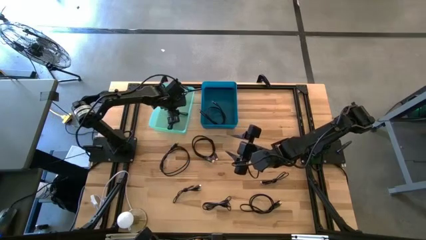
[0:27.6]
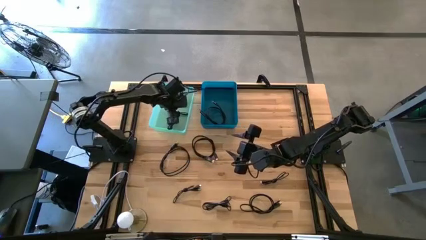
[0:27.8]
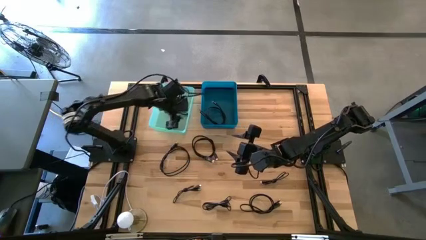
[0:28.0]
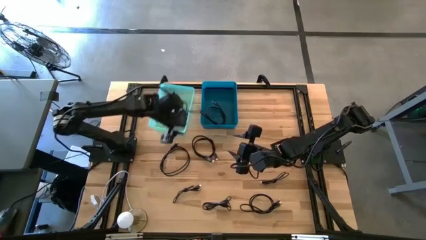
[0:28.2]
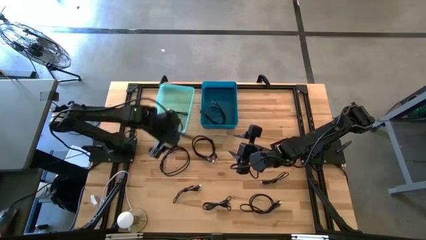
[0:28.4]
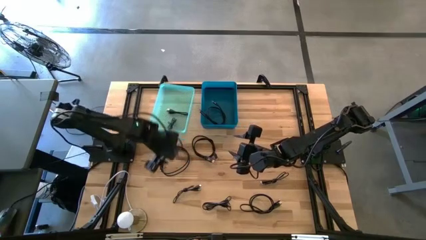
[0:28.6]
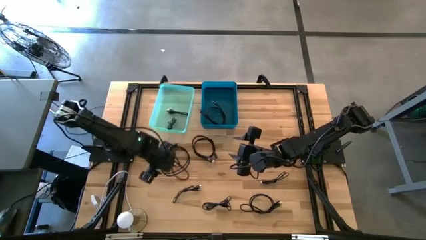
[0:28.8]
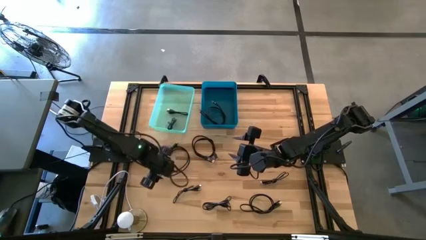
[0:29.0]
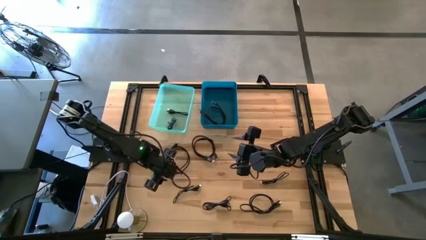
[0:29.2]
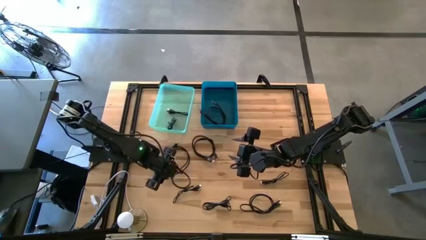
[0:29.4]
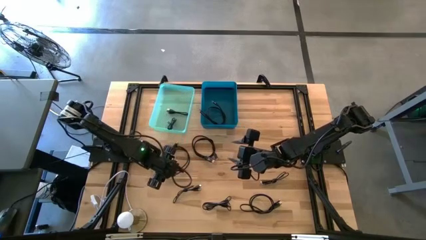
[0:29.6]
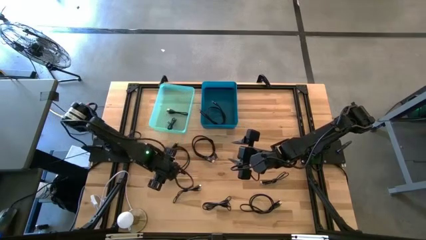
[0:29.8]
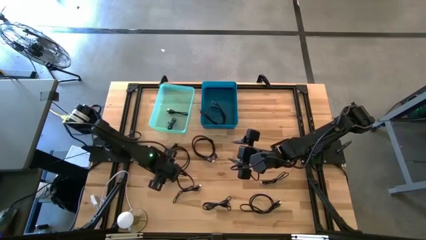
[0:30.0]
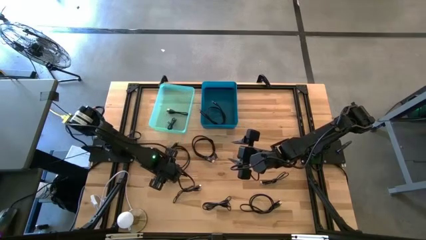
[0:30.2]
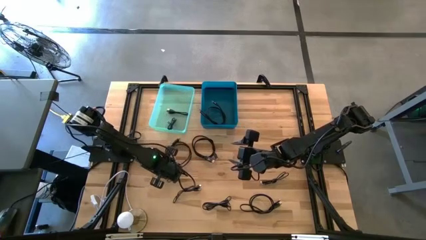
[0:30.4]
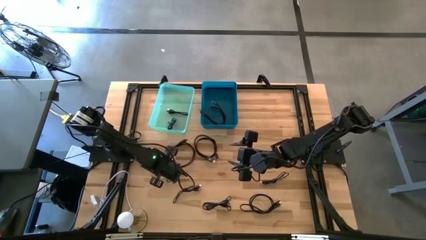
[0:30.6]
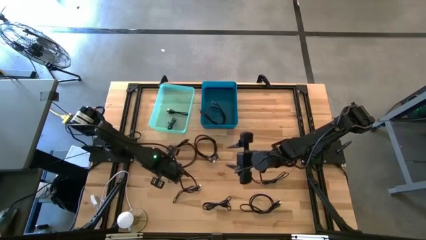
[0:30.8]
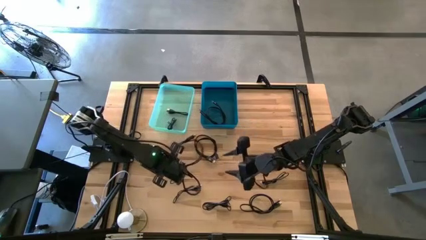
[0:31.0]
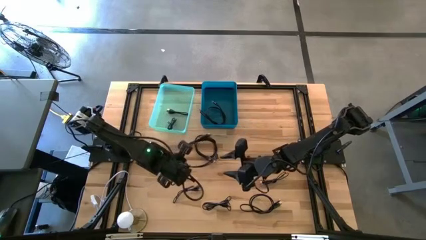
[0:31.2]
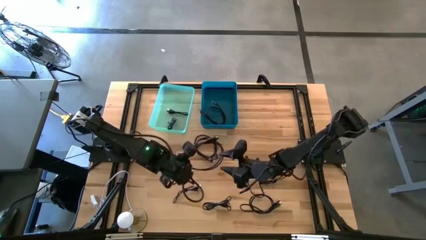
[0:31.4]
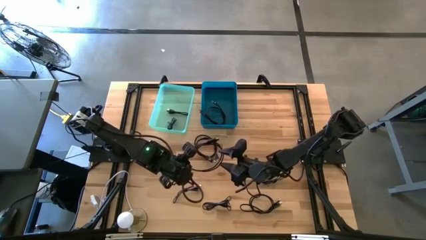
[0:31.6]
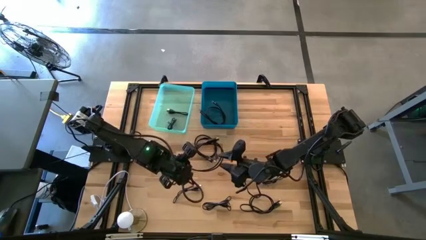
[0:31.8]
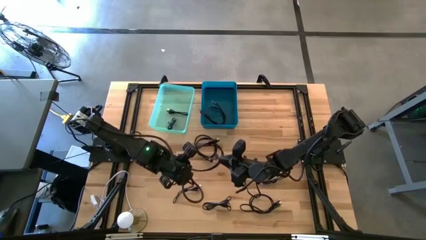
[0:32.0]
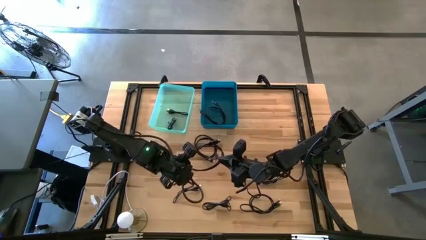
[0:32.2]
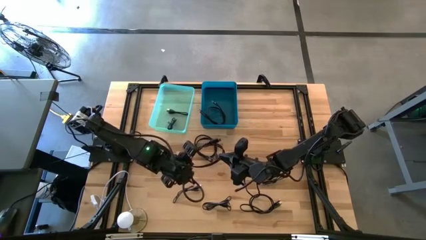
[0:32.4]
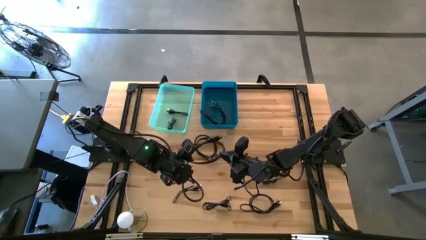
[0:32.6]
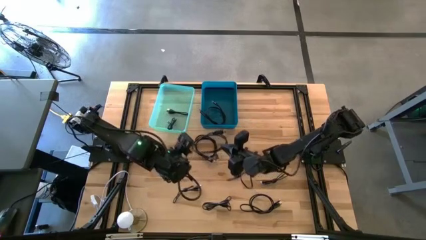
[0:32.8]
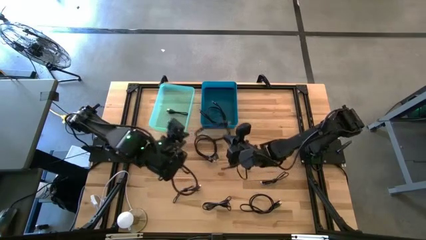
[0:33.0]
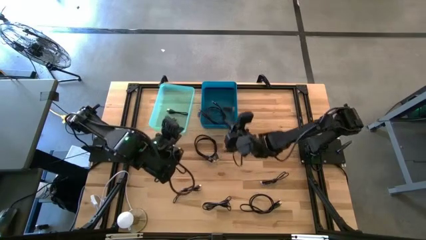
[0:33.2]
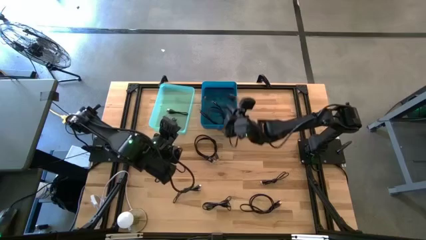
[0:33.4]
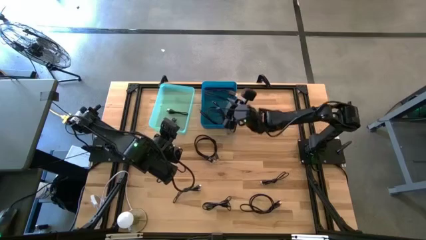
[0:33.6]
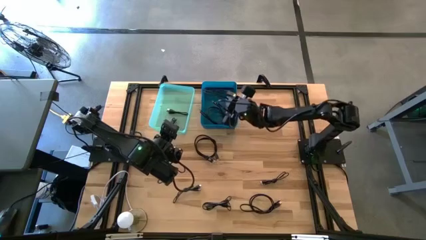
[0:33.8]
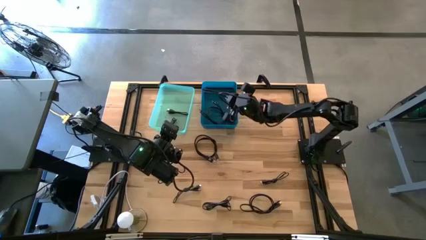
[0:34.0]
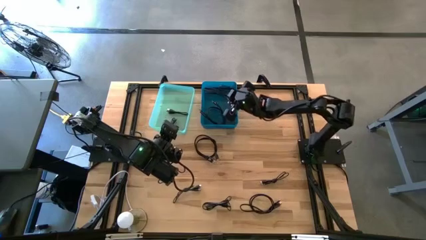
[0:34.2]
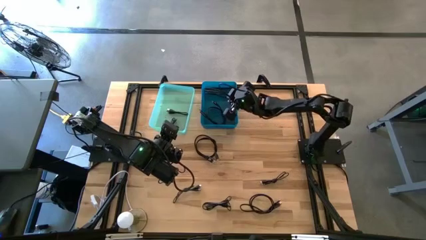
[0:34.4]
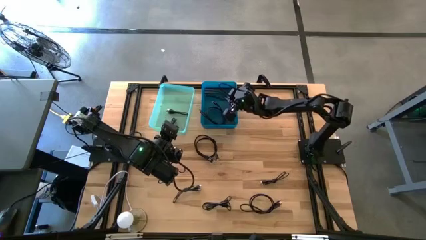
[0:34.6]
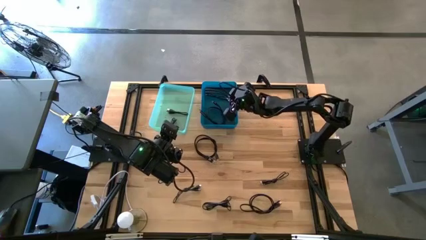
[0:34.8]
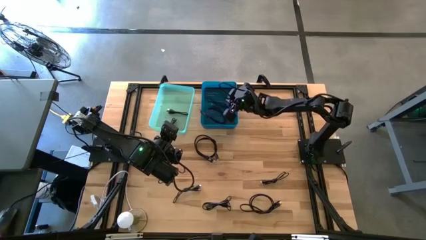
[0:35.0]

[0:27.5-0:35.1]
Task: Pick & Place USB Port
Put the black HDMI cable into the blue bin

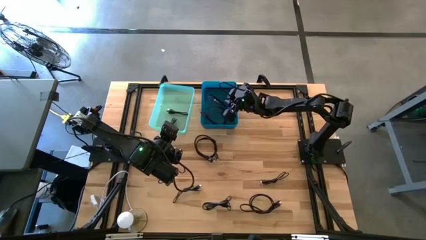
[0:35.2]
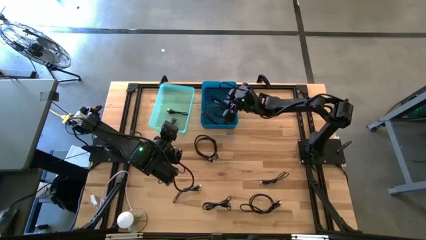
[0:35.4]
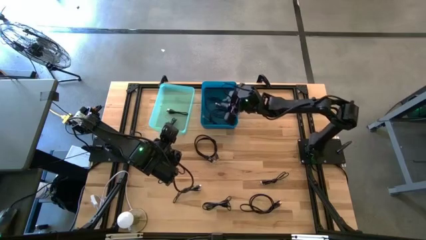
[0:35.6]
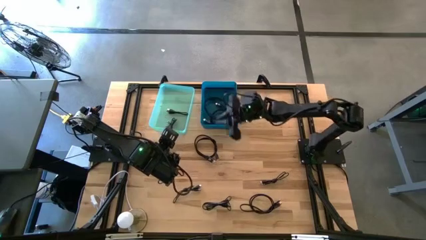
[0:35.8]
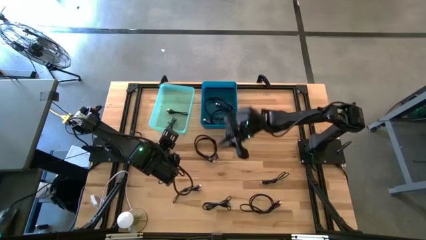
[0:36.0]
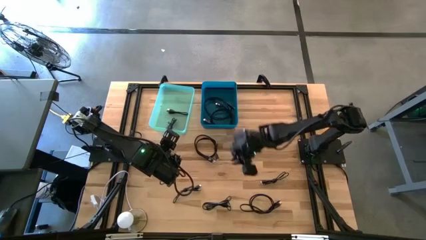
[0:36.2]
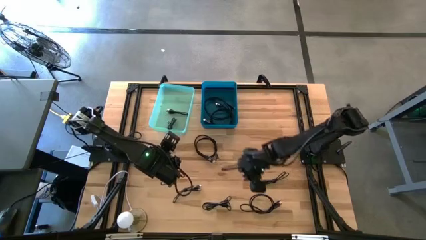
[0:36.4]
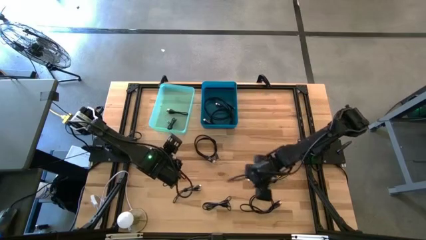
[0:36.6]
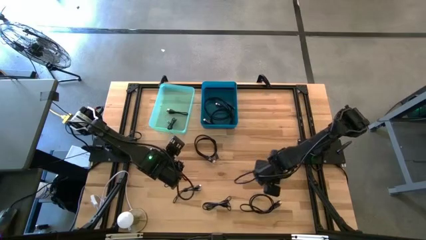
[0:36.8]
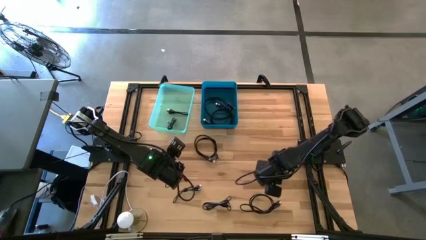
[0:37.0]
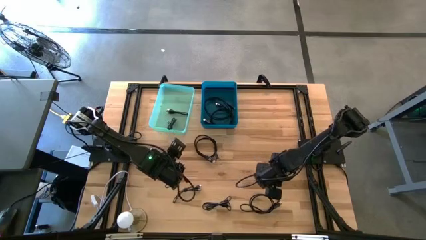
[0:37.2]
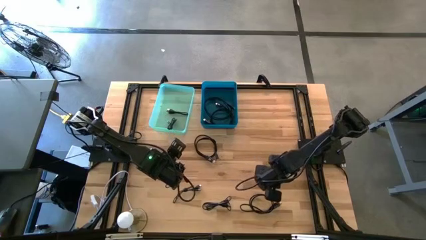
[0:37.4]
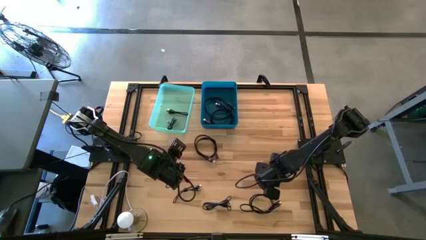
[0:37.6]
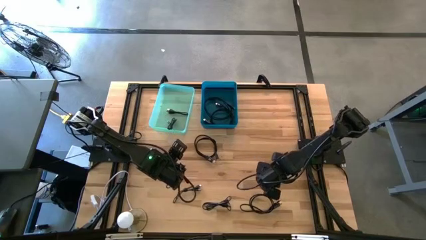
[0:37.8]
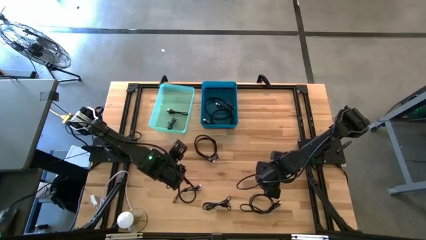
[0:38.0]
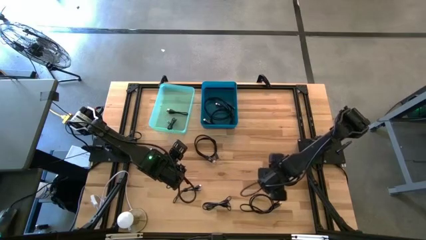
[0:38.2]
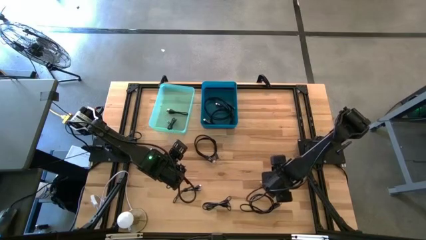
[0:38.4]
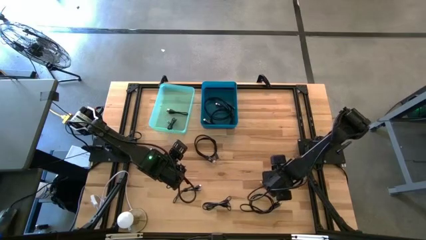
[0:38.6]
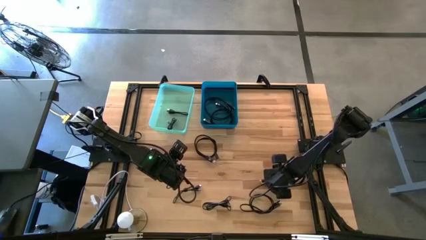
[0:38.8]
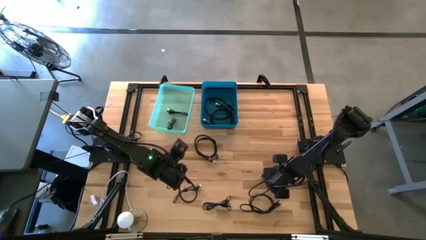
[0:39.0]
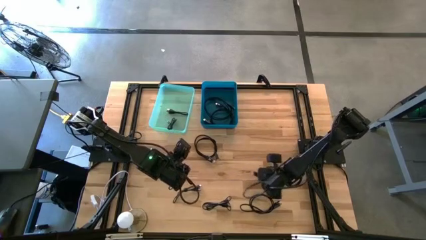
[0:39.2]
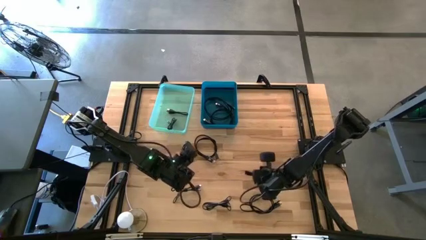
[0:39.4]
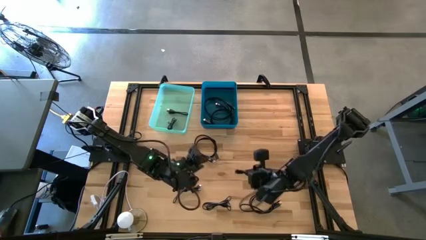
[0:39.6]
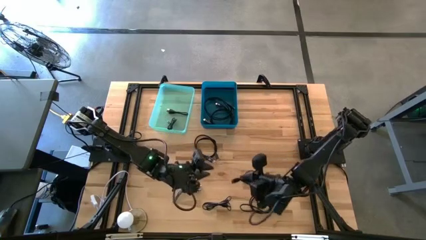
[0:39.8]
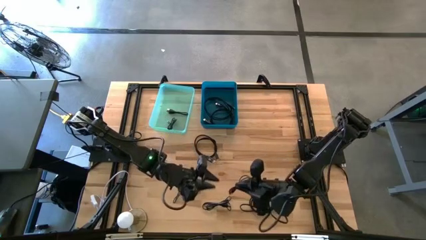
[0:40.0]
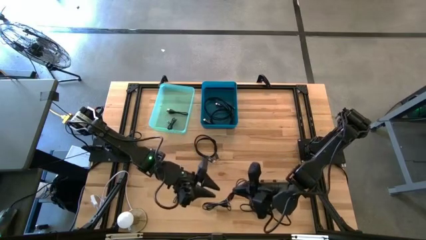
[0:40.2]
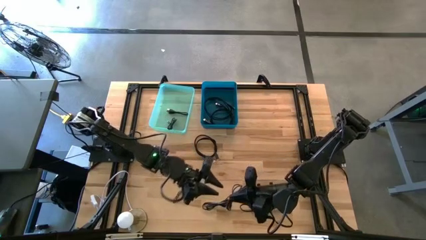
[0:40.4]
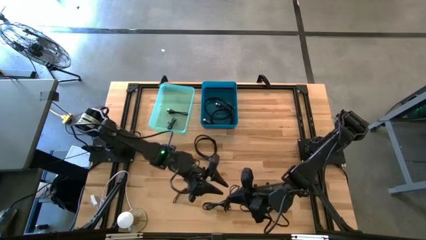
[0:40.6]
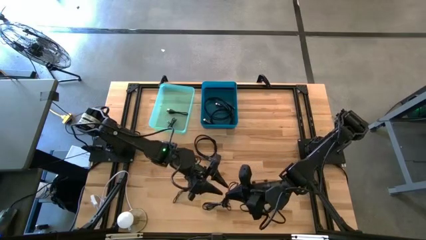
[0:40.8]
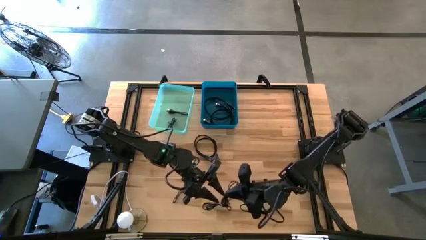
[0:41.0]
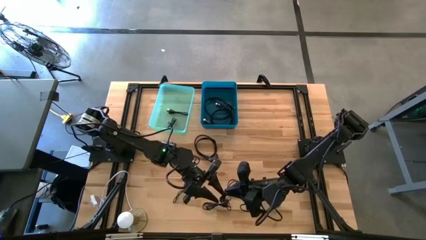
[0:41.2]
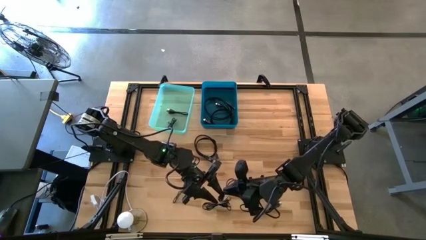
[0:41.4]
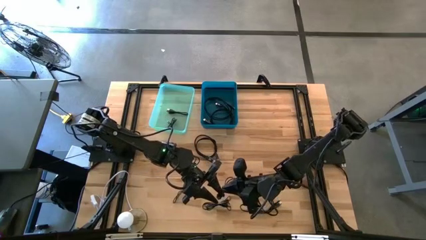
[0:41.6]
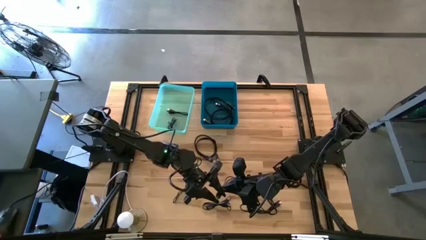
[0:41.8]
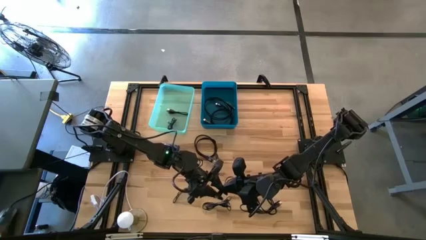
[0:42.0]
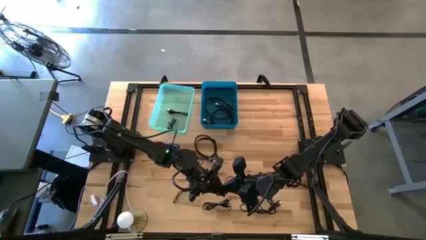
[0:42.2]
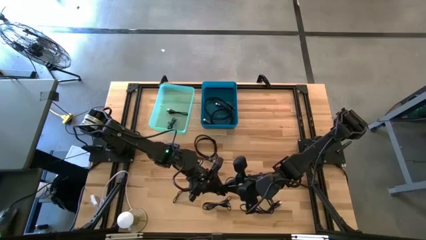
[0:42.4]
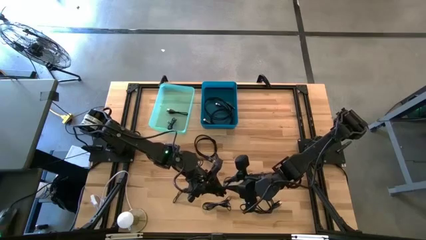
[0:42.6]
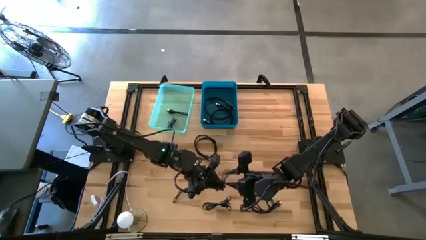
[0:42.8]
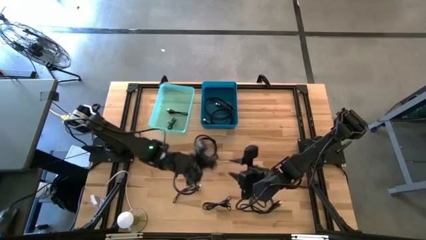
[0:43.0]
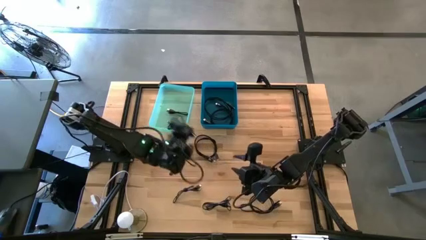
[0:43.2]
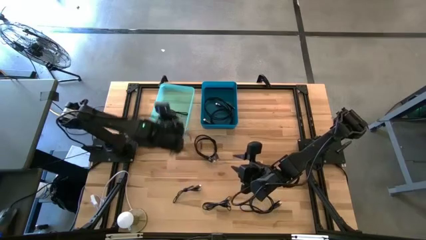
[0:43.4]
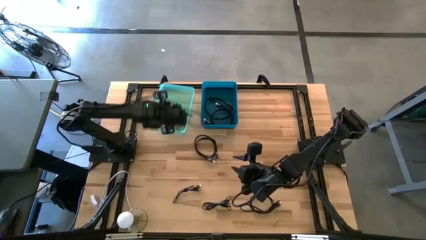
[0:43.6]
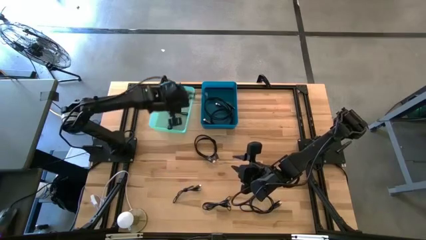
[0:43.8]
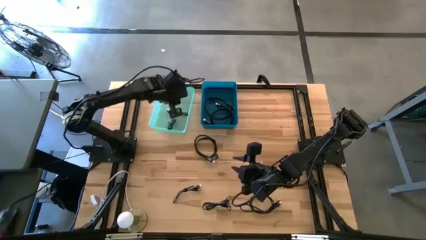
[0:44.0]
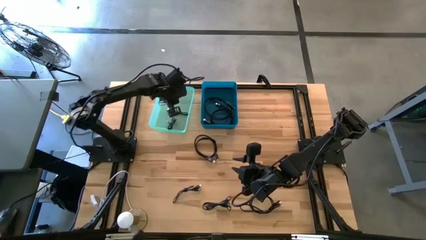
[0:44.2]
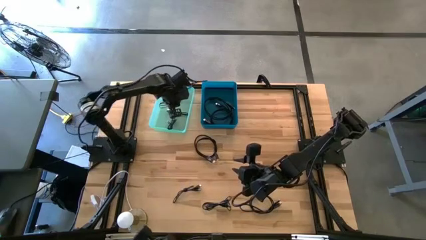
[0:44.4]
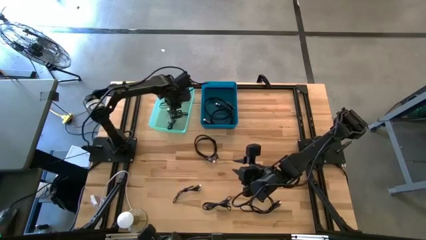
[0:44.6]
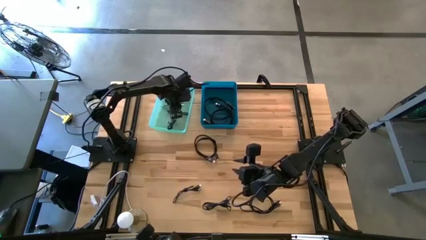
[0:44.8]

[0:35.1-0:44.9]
Put the black USB cable into the green bin
